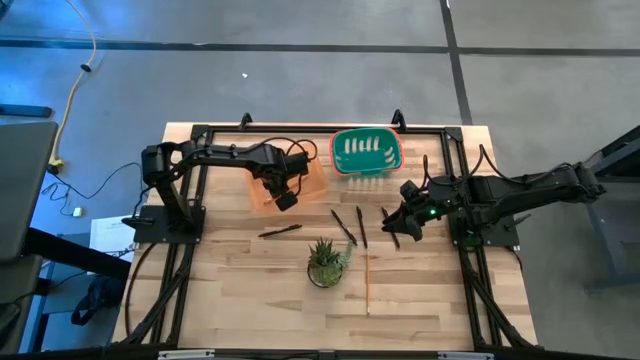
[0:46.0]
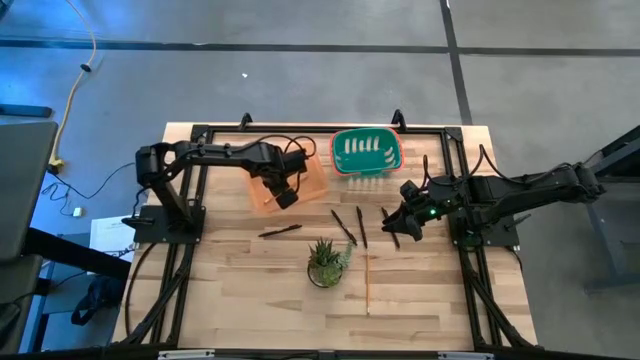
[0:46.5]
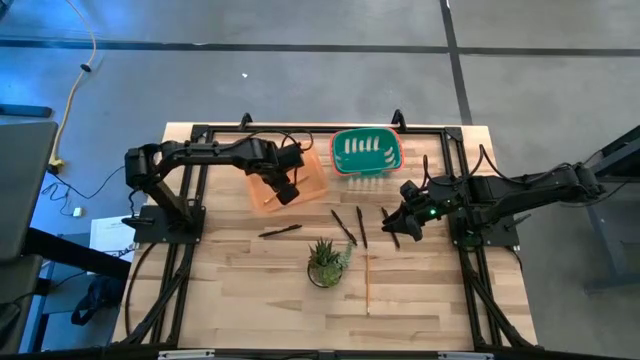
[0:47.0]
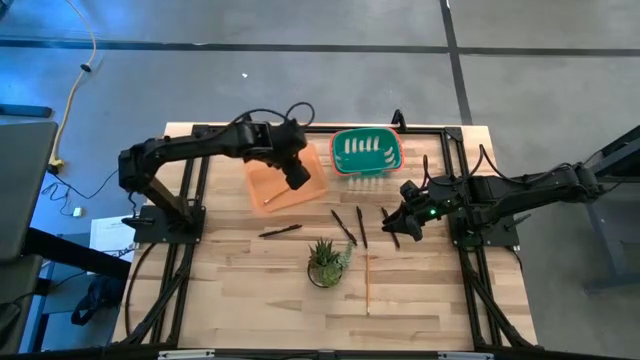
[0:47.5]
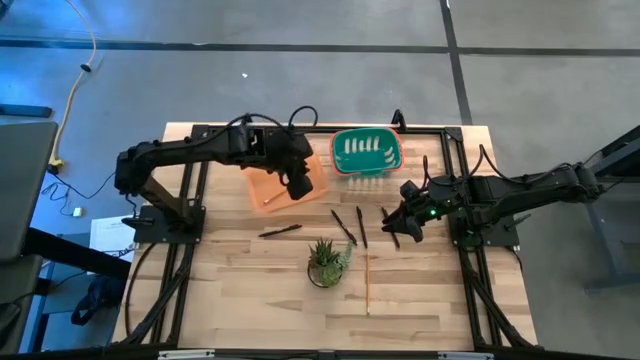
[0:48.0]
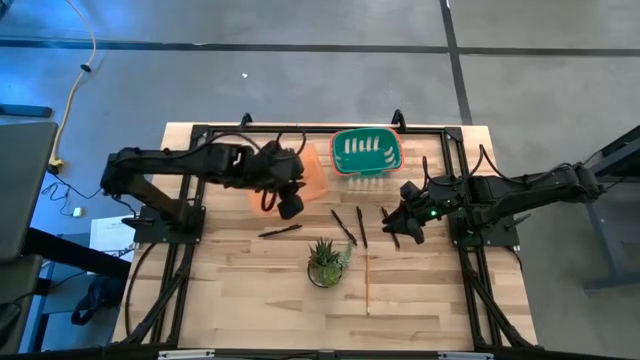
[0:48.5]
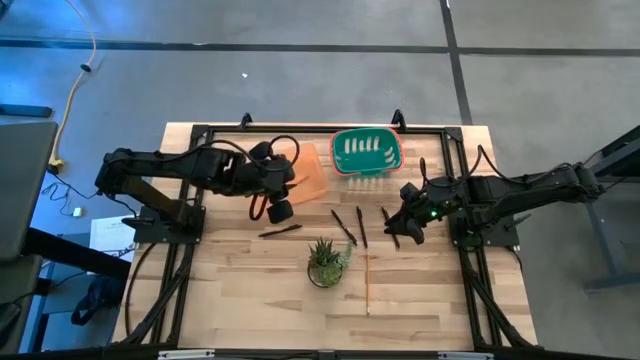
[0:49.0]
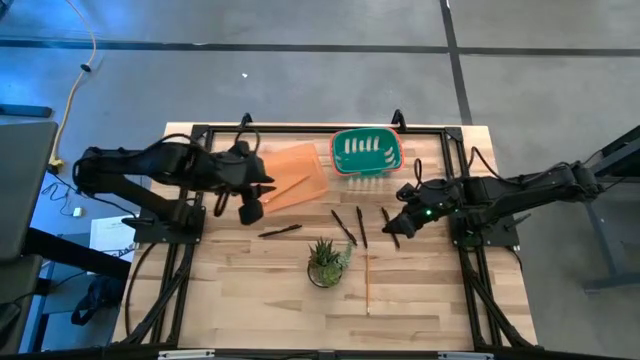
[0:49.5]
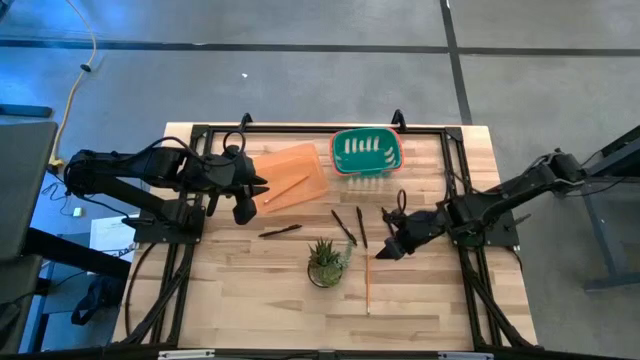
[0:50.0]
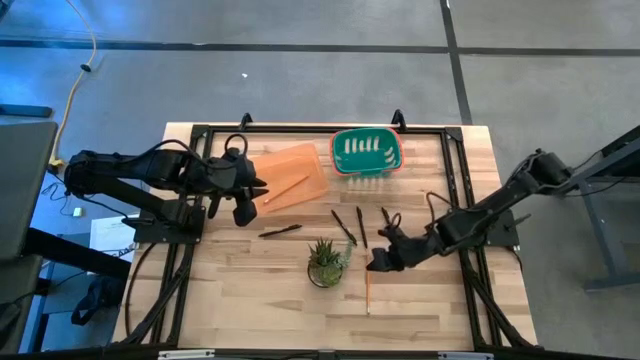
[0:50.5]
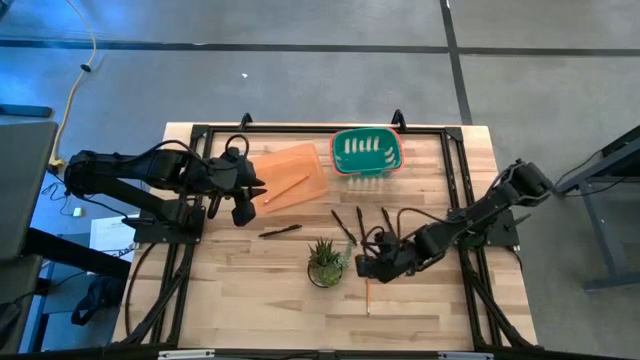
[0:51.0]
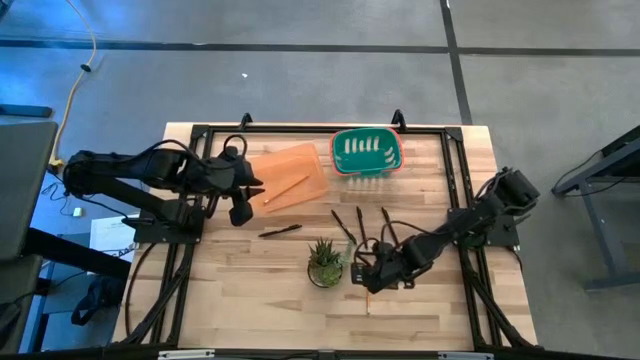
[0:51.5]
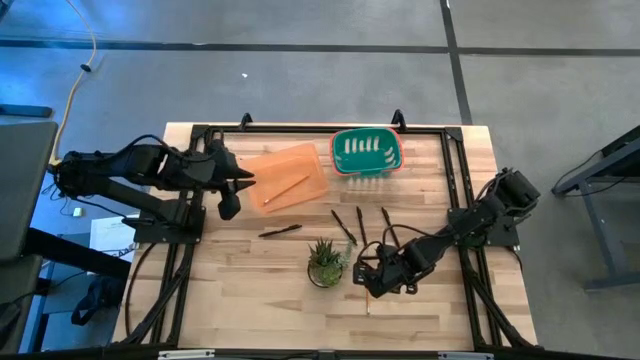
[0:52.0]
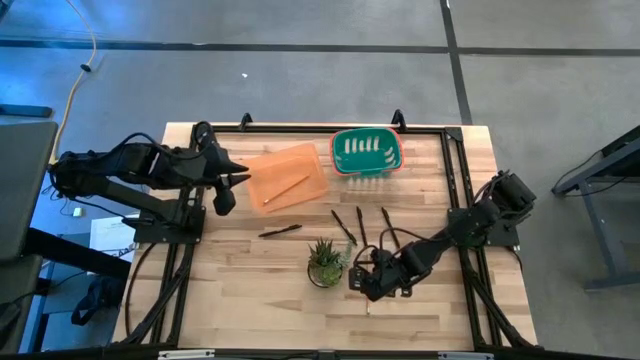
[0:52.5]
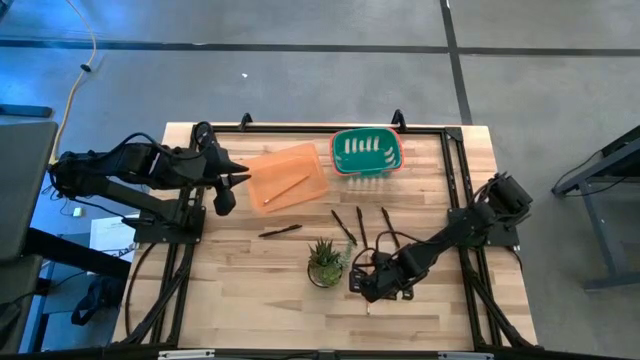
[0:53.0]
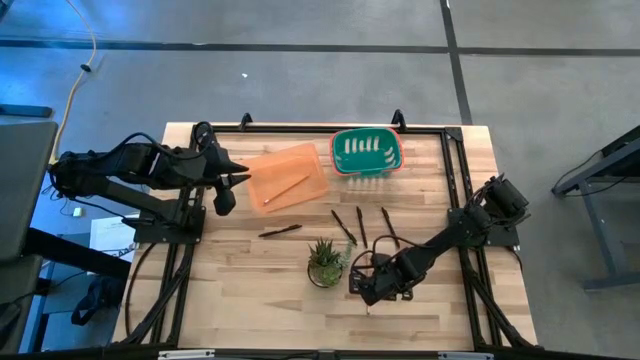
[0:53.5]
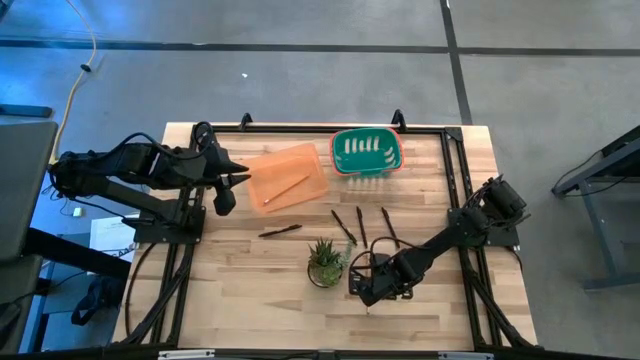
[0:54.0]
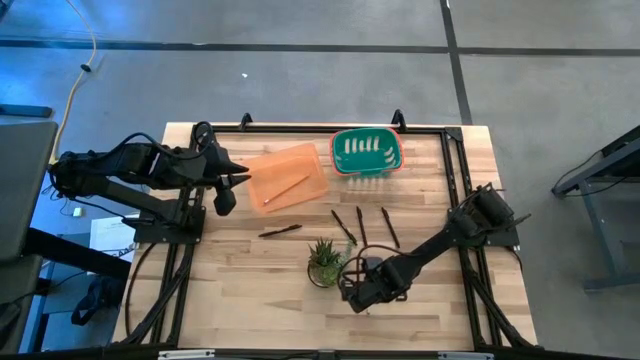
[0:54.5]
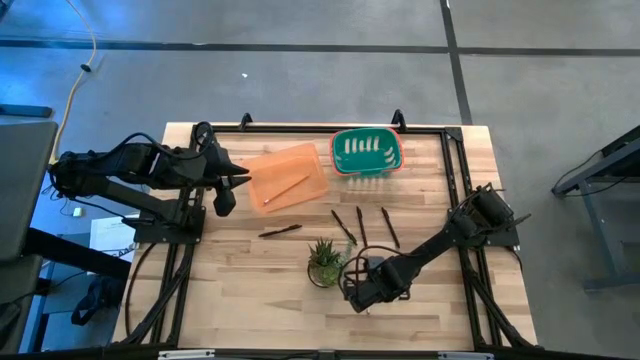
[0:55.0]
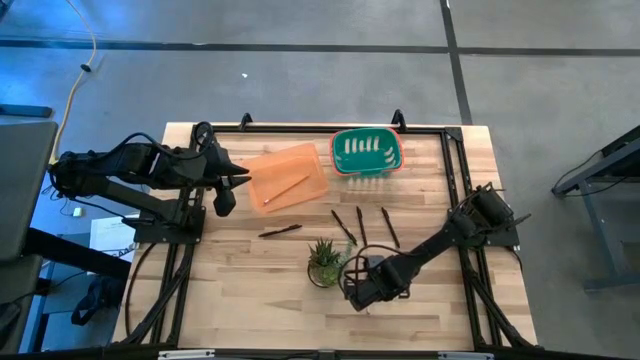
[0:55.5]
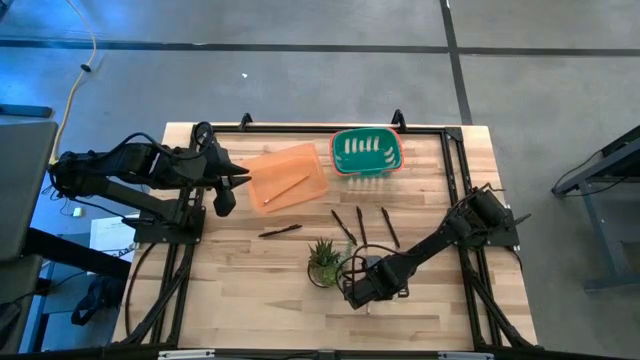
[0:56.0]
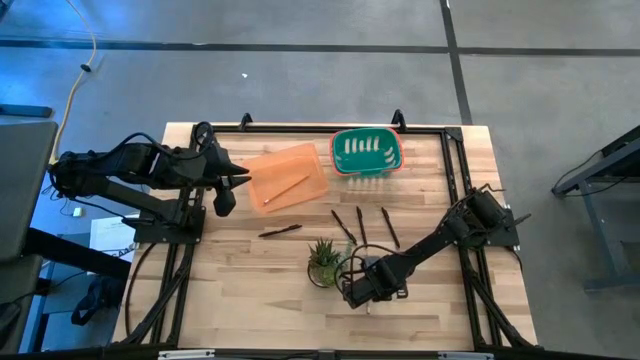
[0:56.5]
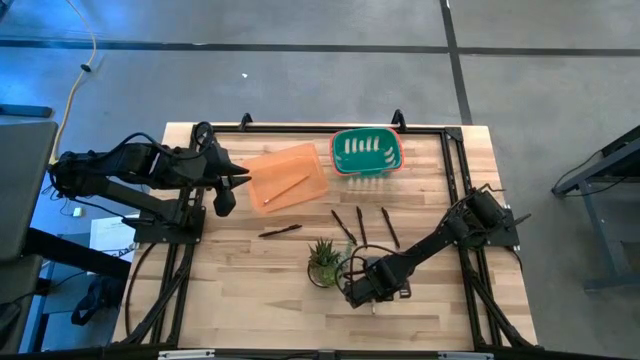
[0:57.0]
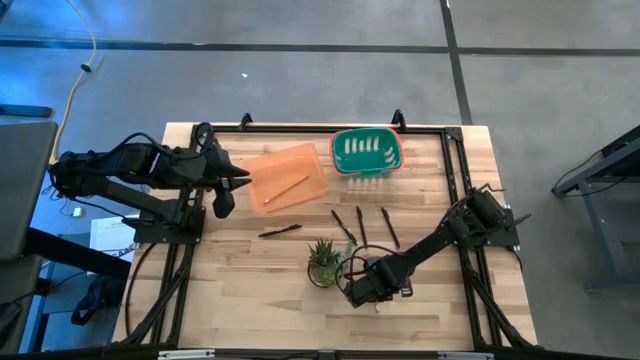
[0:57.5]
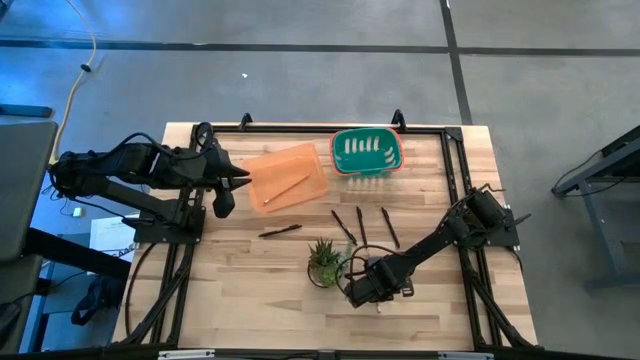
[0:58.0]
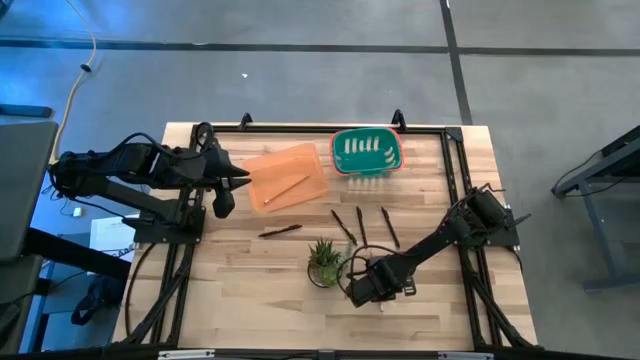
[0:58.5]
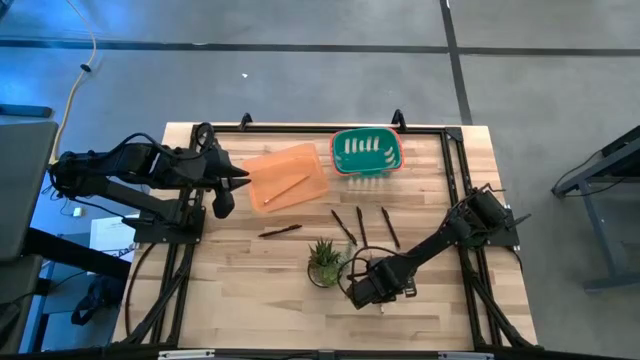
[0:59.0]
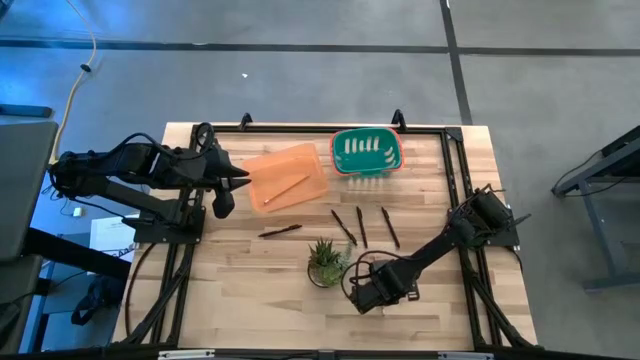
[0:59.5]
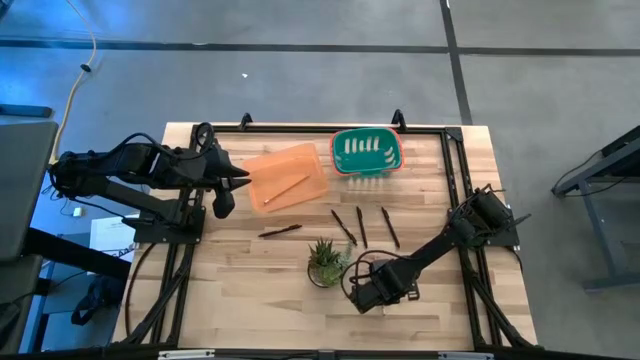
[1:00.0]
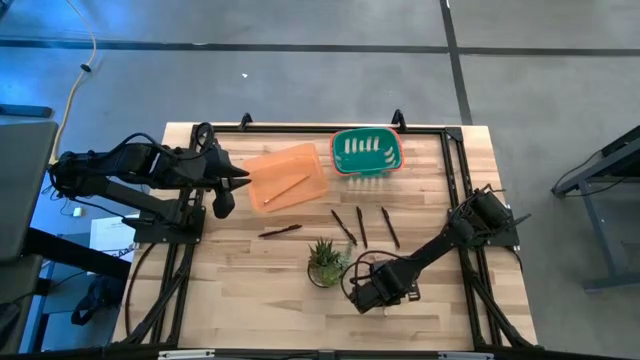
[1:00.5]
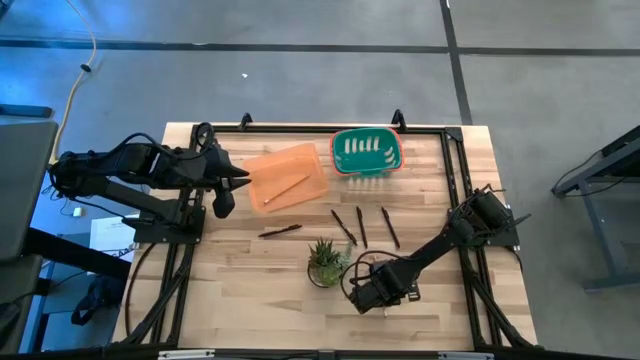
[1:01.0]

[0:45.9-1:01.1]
Task: Sort pens & pencils
Put the orange pencil into the orange bin

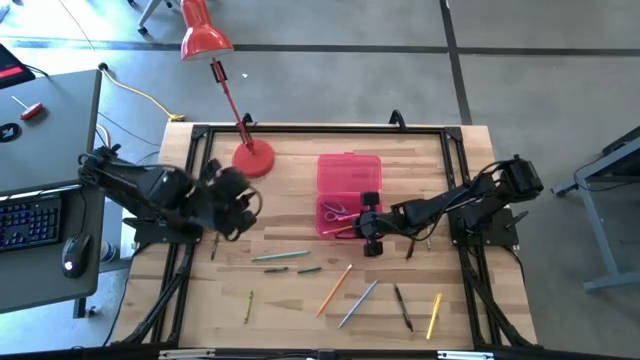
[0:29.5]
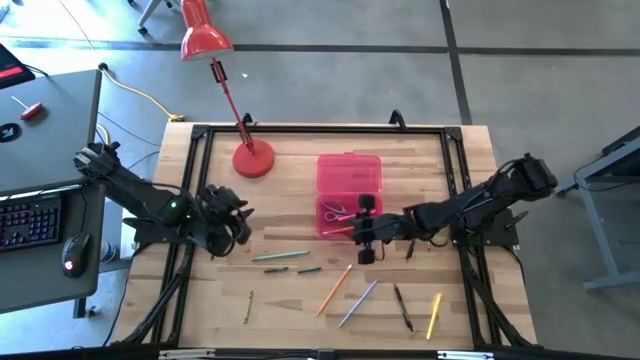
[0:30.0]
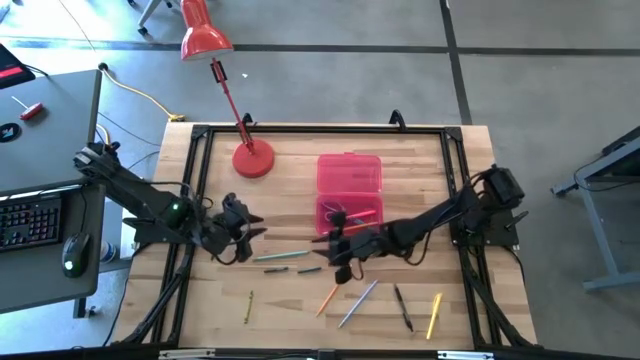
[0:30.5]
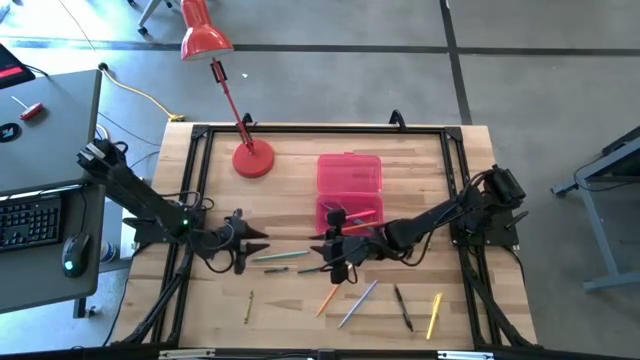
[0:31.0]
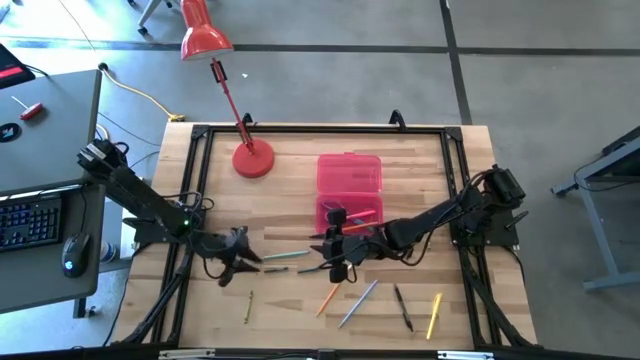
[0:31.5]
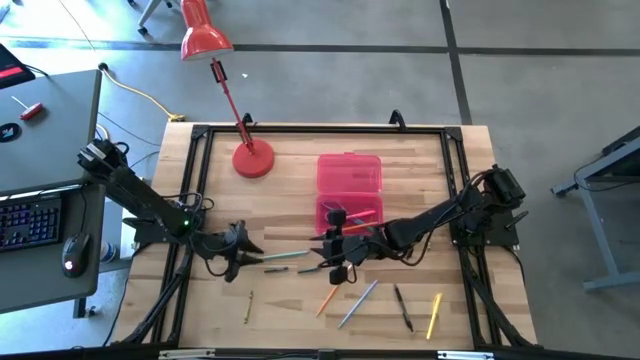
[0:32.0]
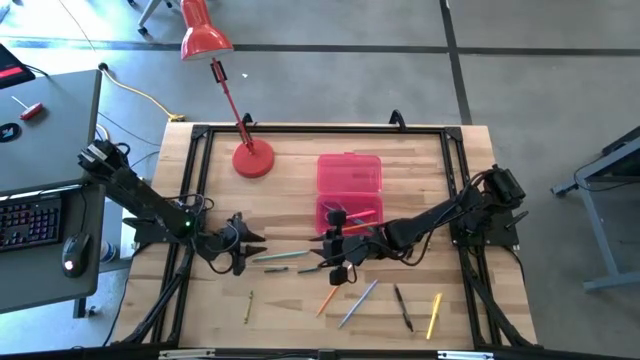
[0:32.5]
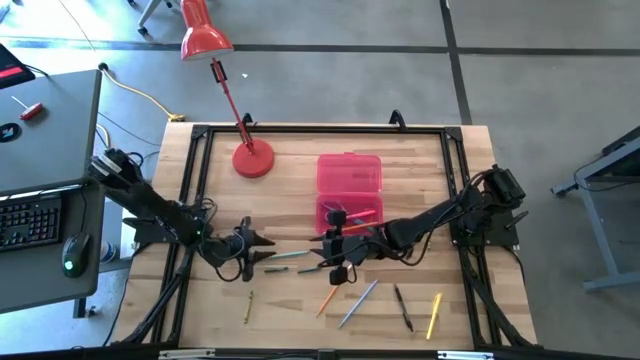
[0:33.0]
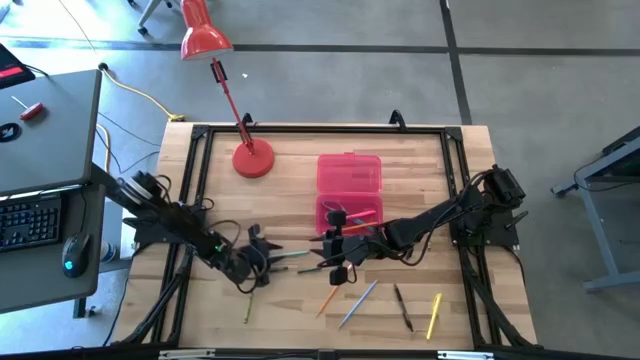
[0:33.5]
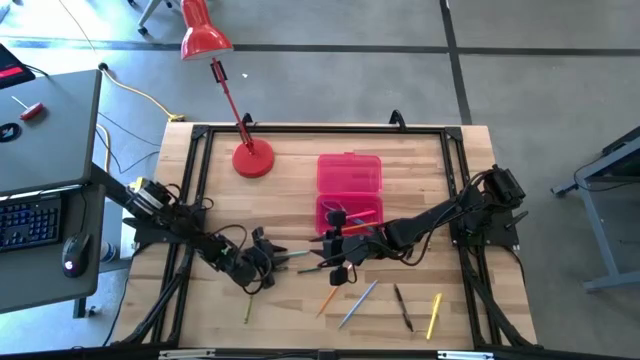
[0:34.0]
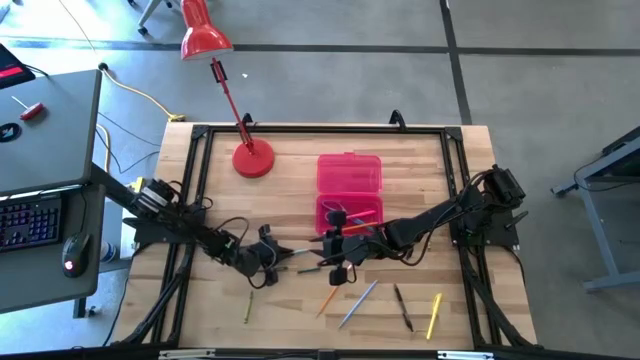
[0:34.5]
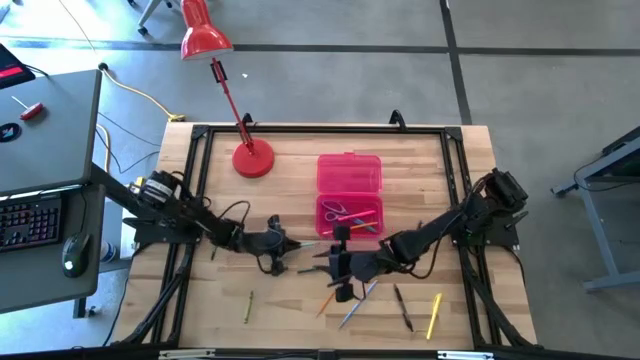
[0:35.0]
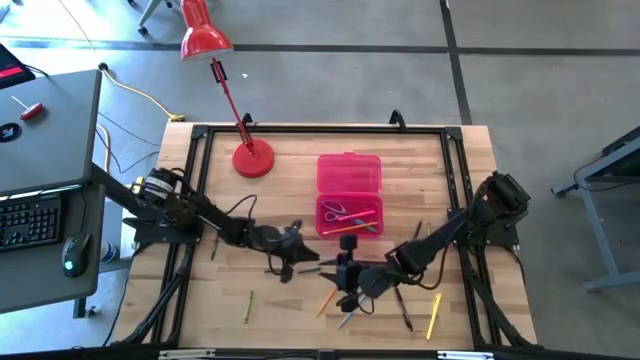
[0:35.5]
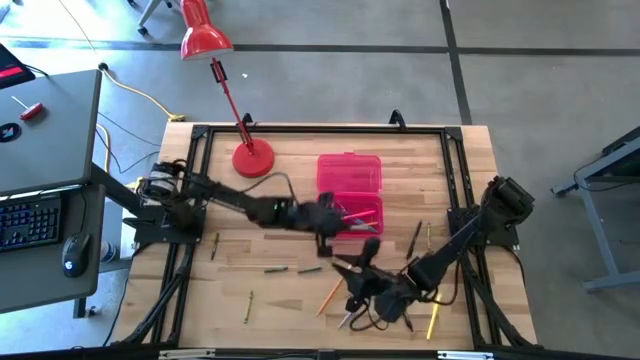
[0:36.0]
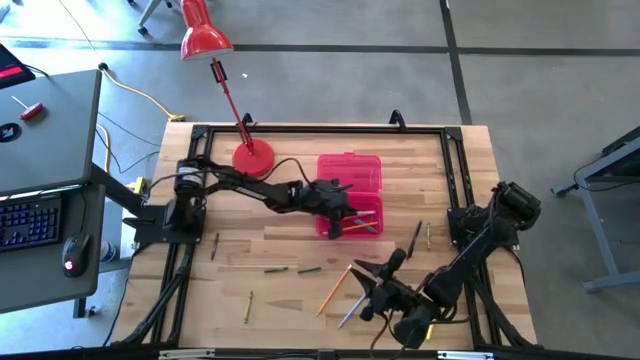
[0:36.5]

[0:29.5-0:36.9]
Task: Pick & place school supplies into a supply box
Put the top light blue pencil into the red supply box
